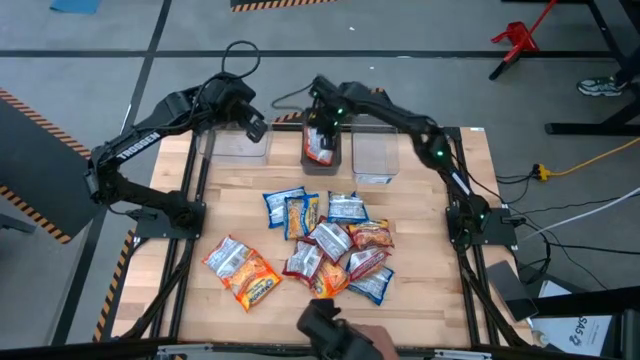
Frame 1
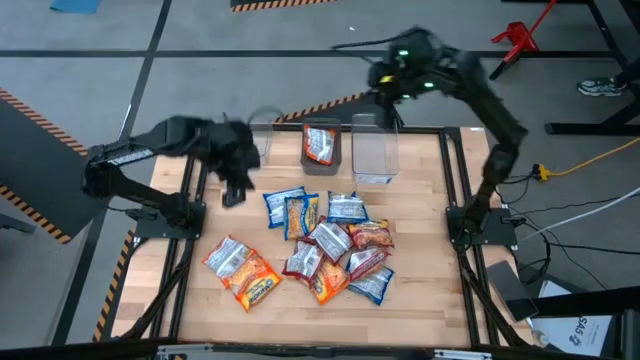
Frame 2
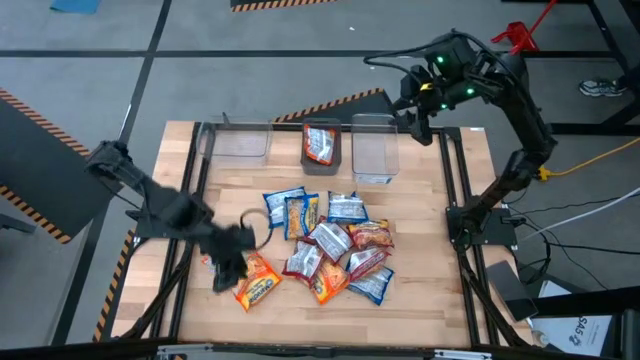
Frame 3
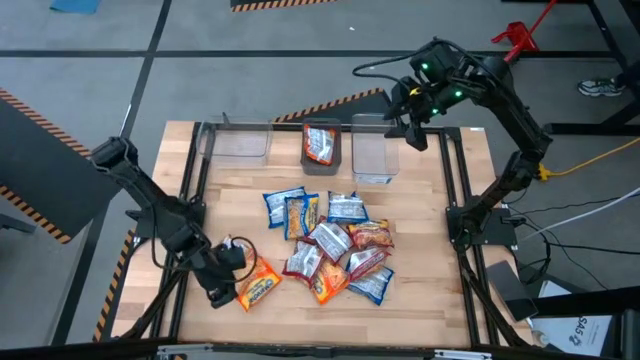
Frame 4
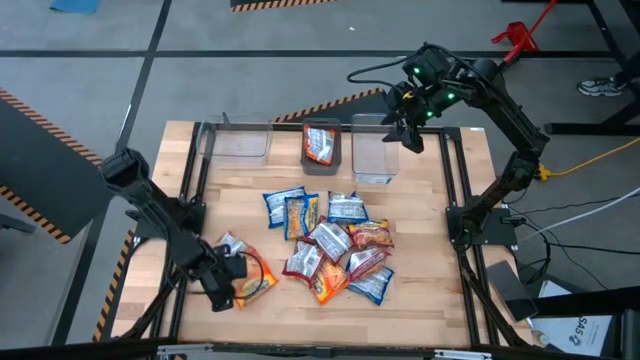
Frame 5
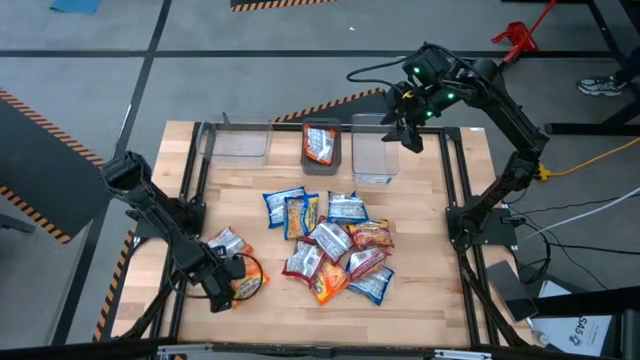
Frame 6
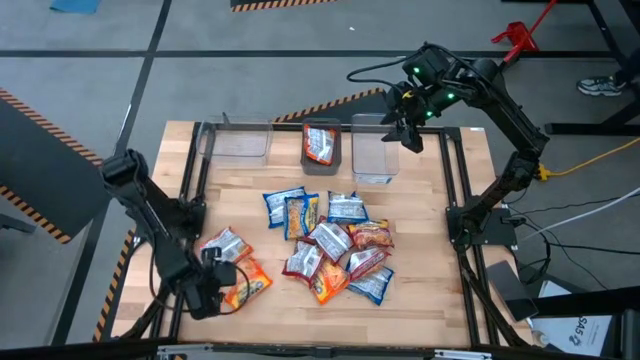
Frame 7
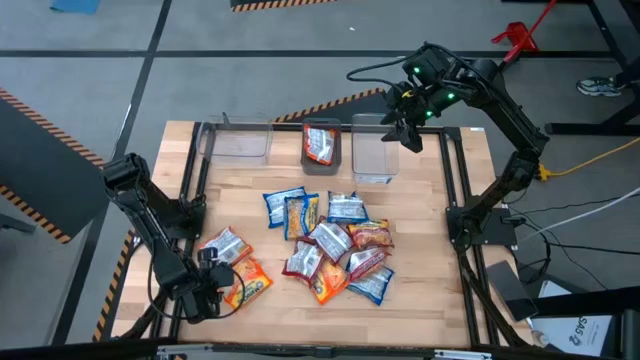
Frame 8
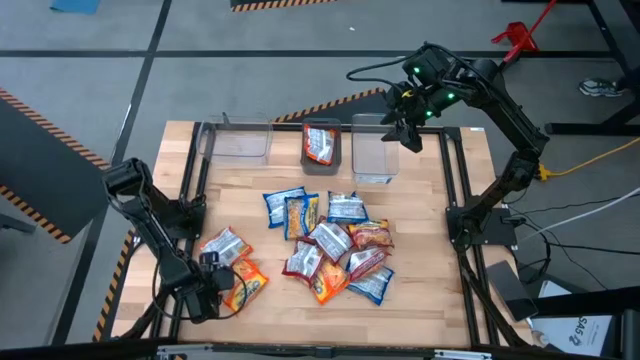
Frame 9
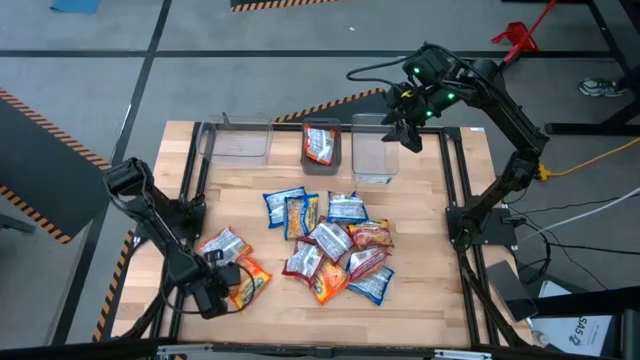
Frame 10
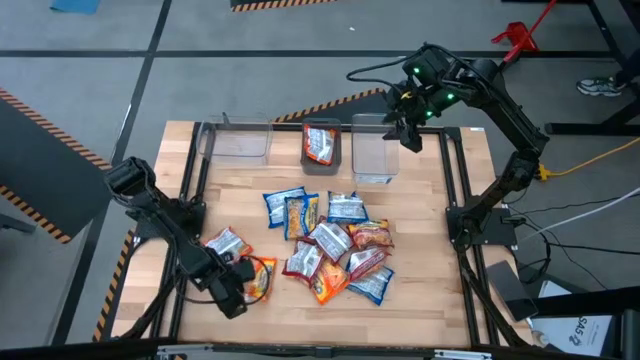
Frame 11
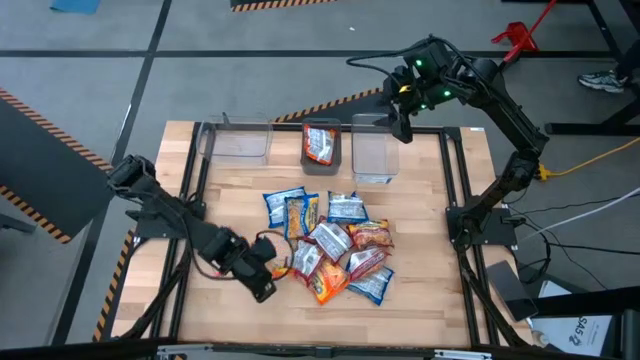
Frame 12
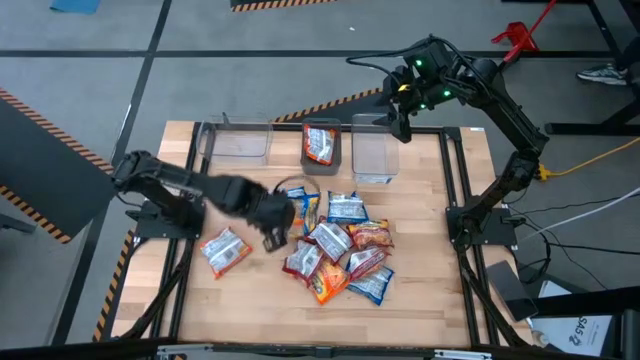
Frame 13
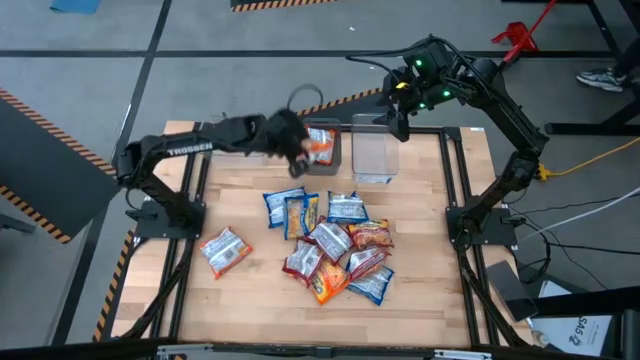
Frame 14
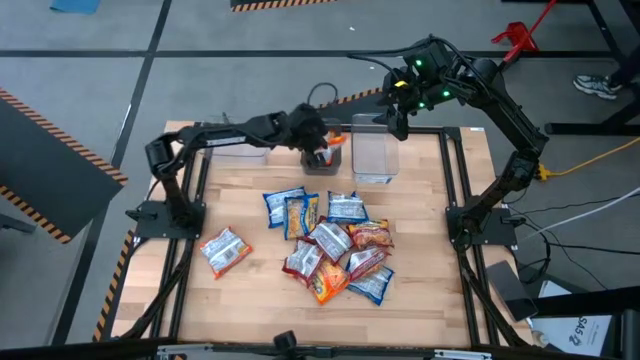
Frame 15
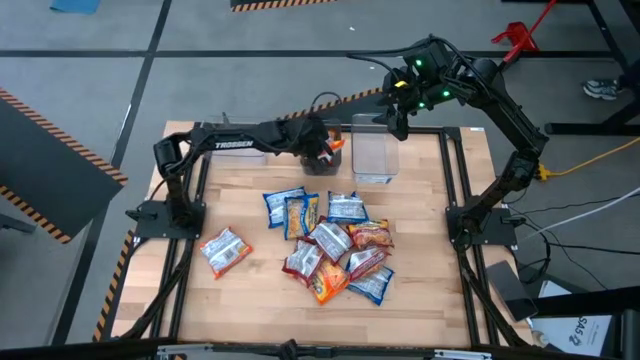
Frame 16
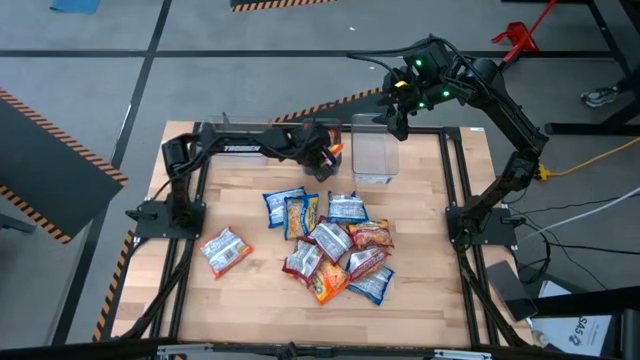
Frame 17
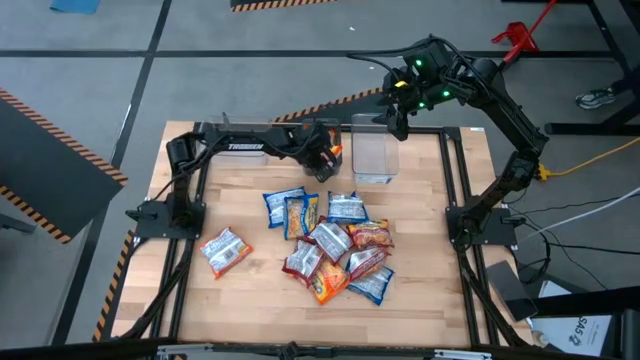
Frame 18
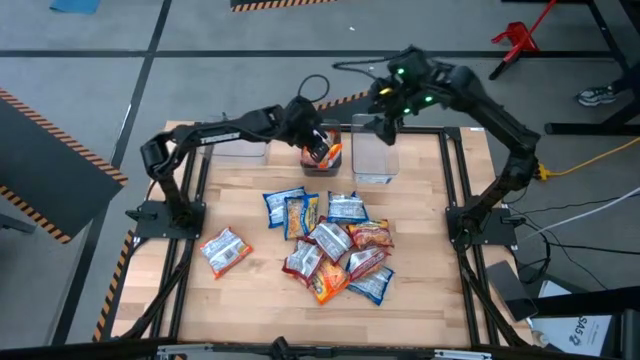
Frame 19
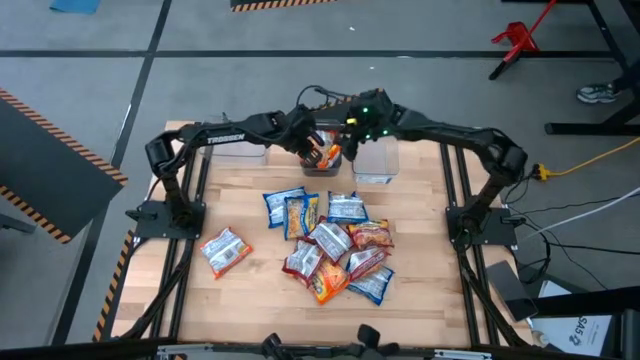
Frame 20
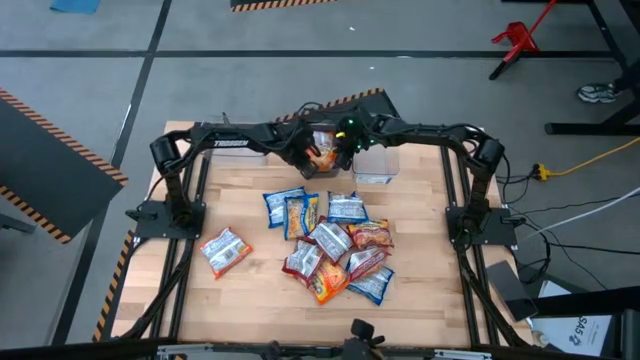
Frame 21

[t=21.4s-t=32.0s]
Task: Sort Maruchan noodles
Put the orange noodle pack into the black bin

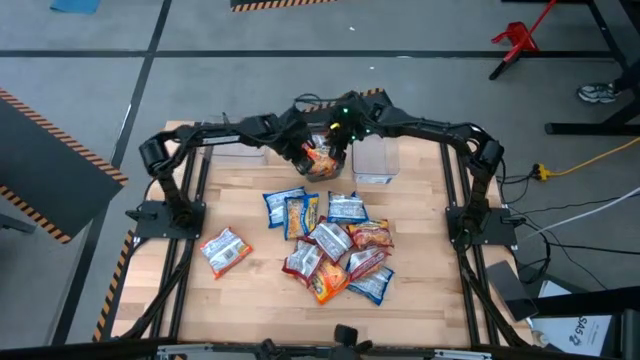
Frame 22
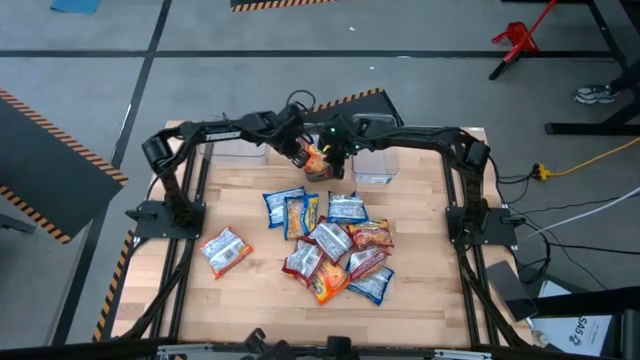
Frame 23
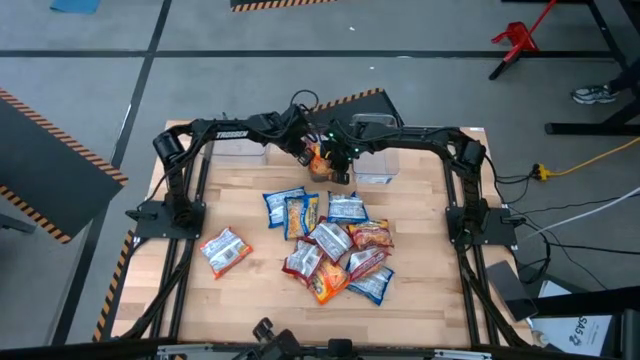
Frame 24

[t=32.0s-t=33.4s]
Adjust the black bin

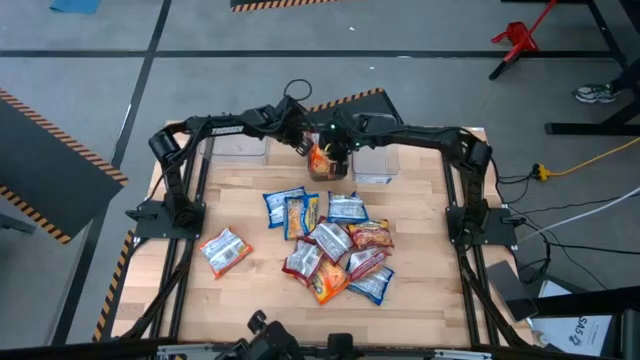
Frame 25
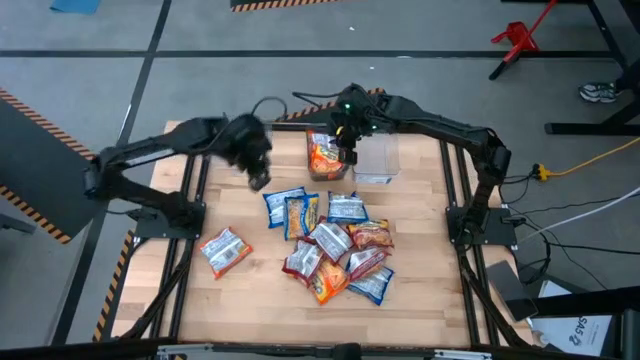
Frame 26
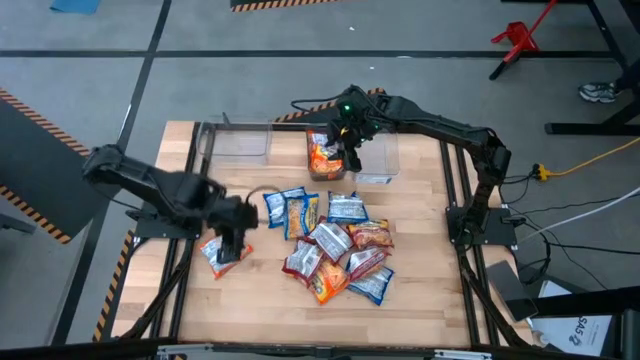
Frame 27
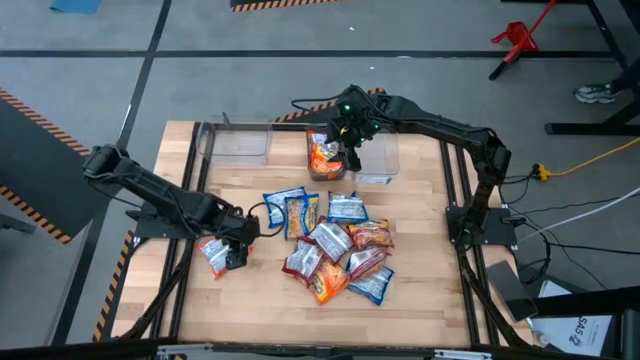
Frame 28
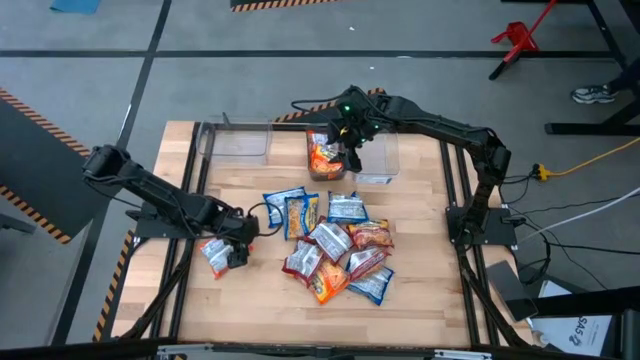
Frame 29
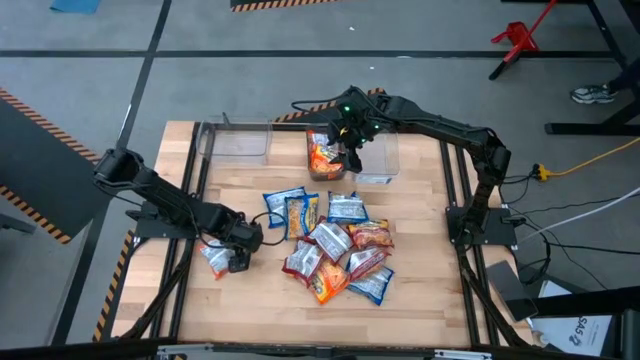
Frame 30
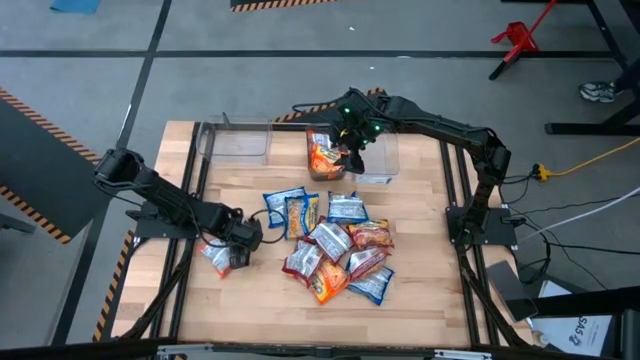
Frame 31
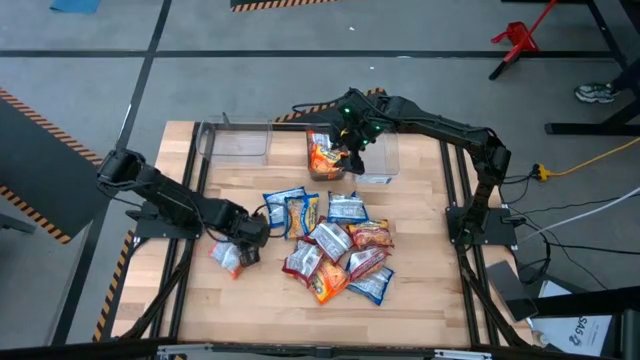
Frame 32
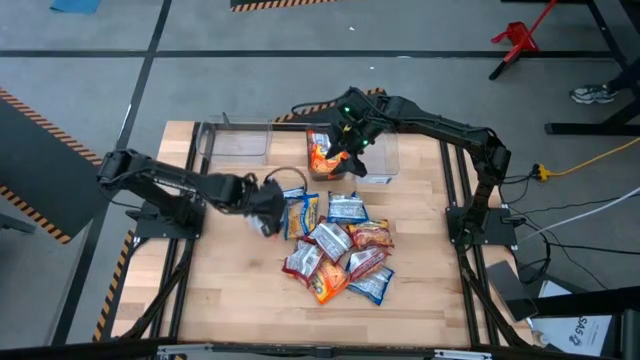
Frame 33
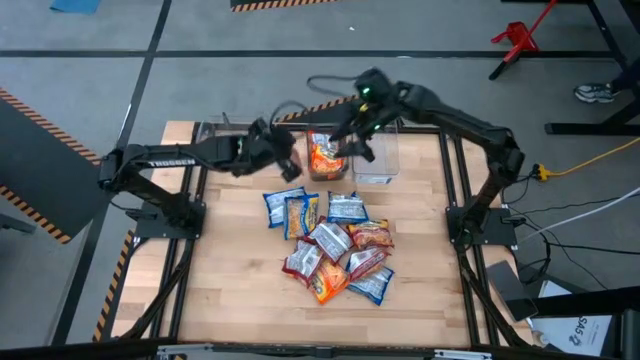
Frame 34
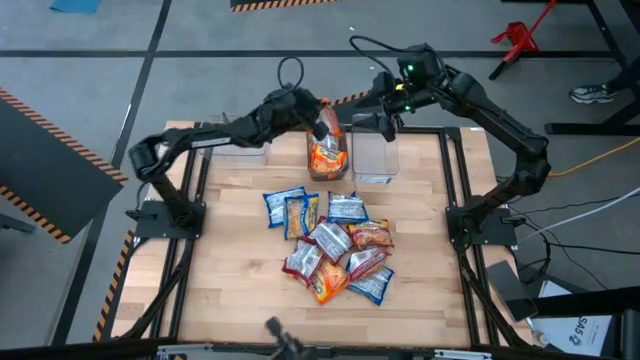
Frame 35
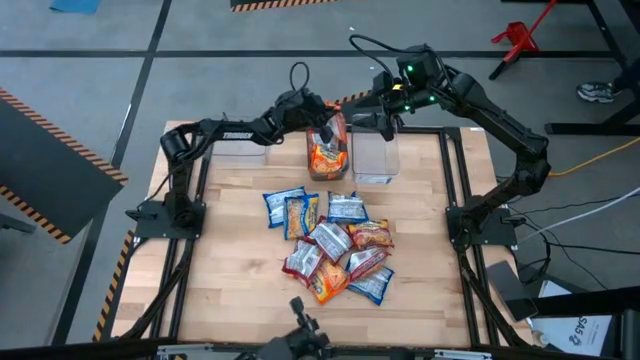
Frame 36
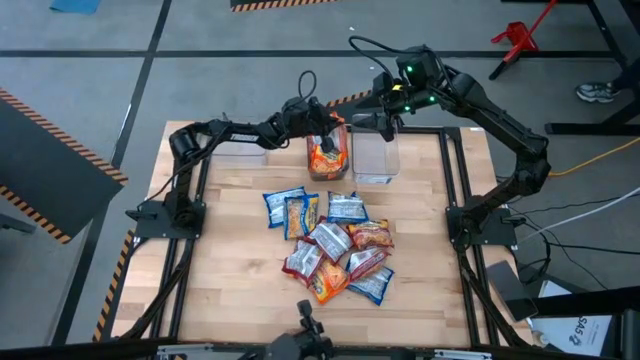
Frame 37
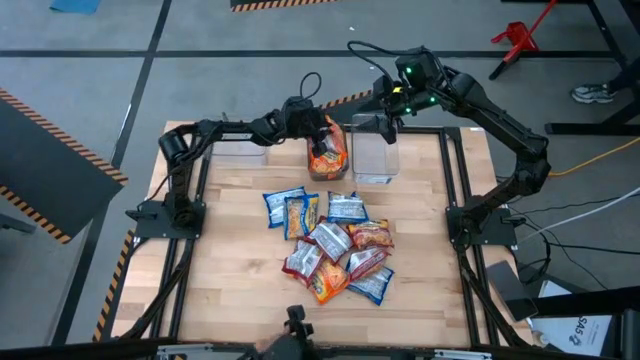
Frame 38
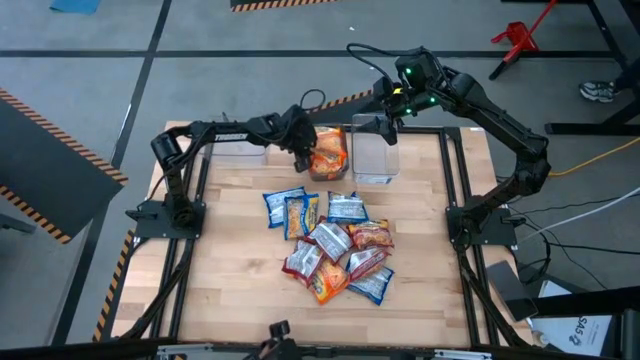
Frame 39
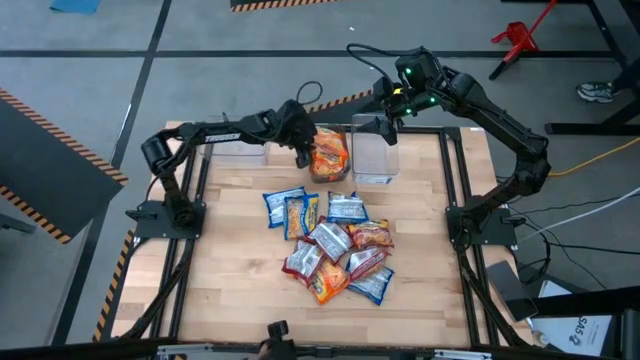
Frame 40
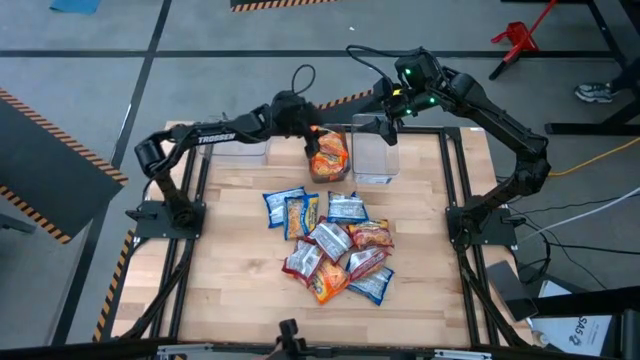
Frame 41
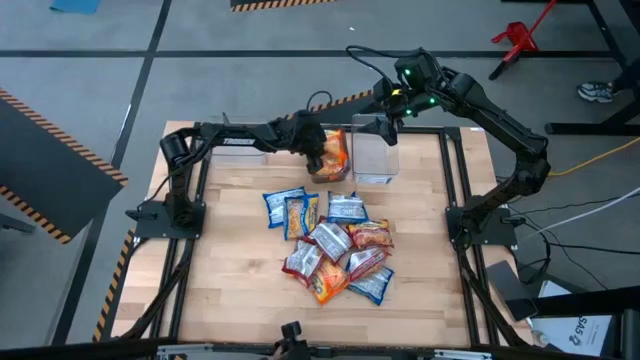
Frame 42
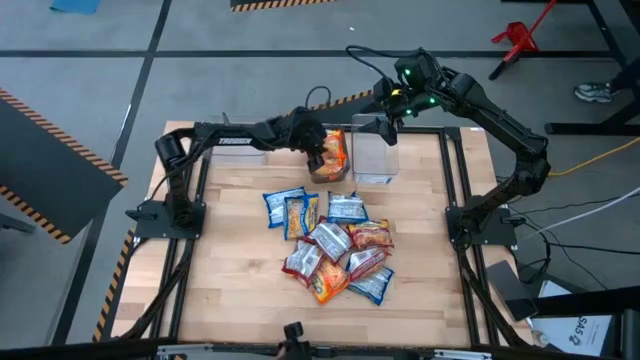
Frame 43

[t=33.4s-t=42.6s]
Put the orange noodle pack into the black bin
